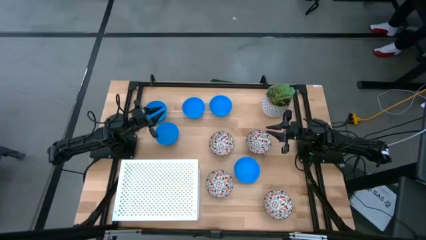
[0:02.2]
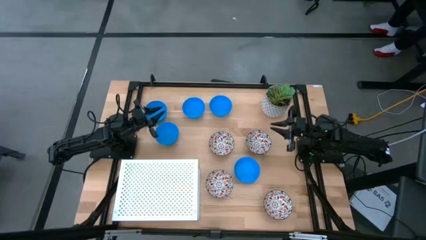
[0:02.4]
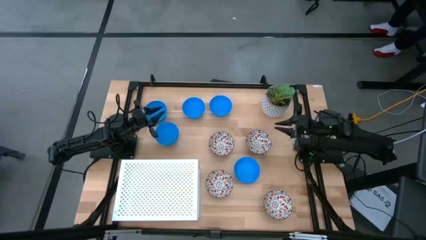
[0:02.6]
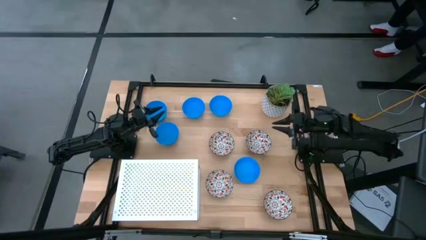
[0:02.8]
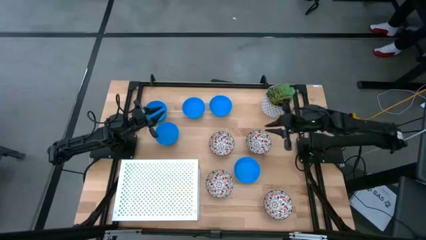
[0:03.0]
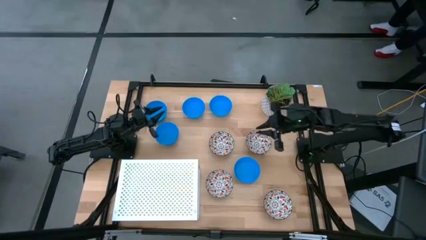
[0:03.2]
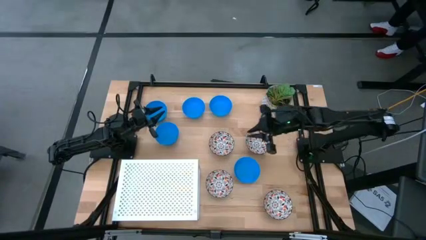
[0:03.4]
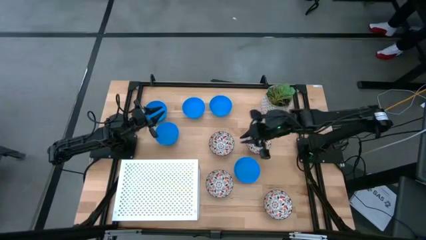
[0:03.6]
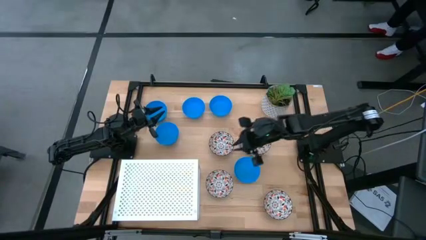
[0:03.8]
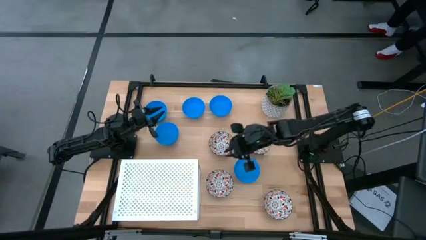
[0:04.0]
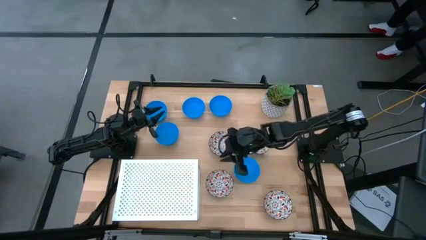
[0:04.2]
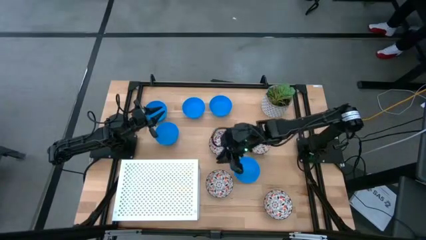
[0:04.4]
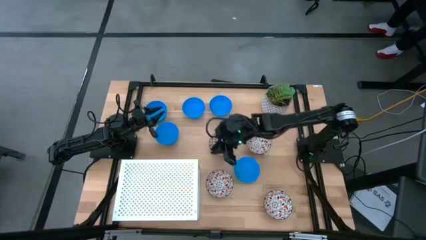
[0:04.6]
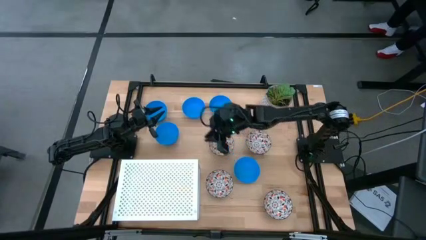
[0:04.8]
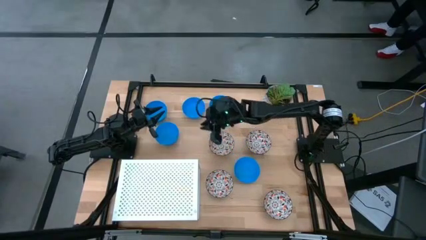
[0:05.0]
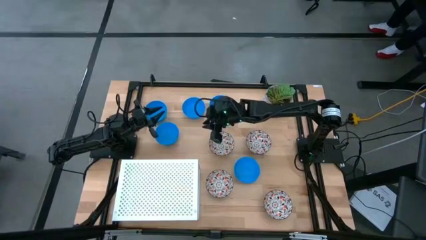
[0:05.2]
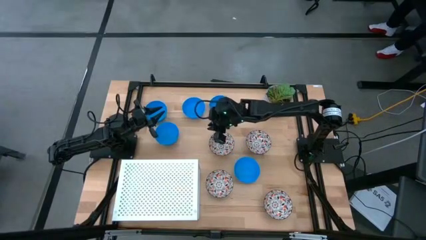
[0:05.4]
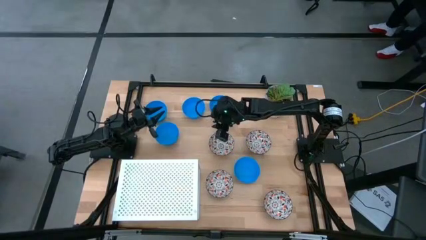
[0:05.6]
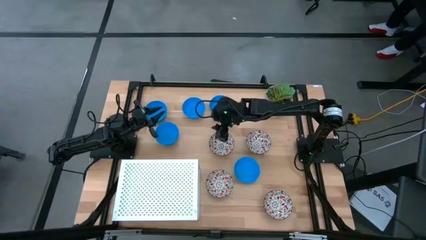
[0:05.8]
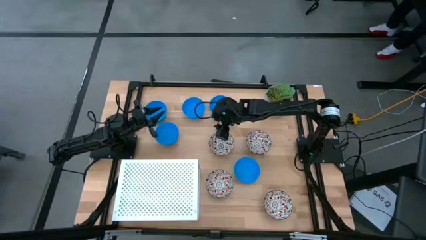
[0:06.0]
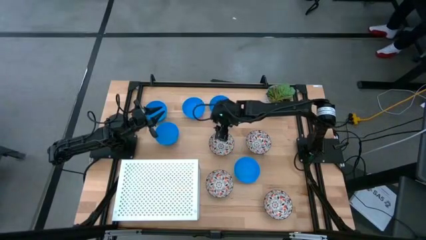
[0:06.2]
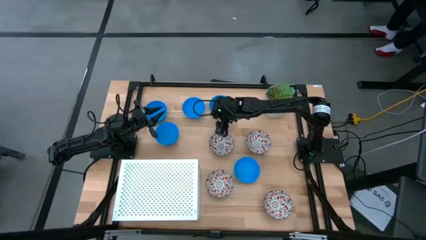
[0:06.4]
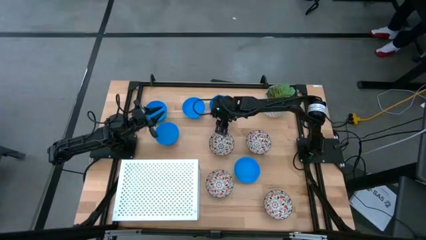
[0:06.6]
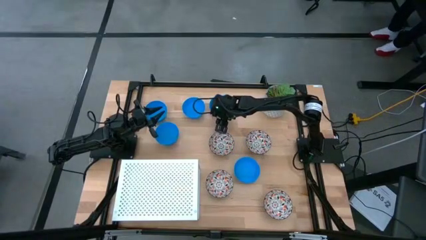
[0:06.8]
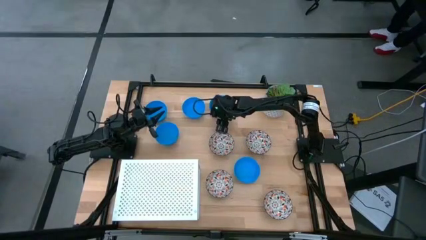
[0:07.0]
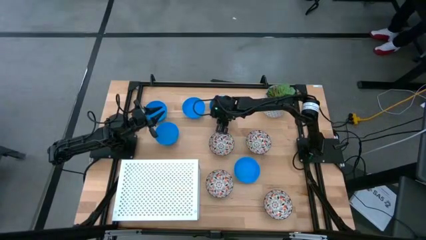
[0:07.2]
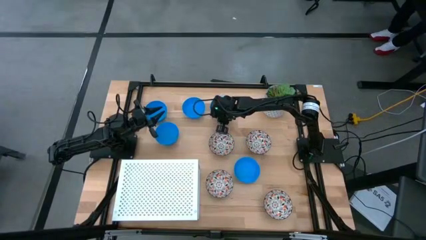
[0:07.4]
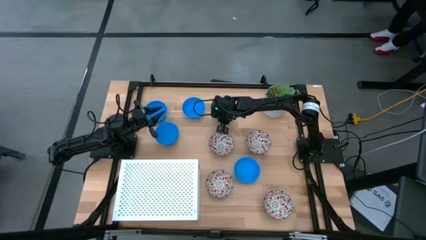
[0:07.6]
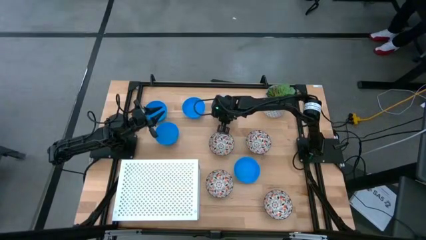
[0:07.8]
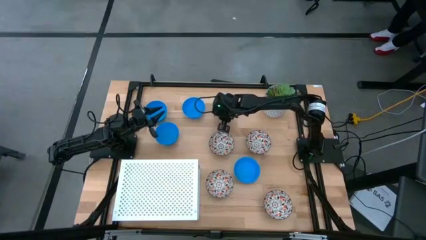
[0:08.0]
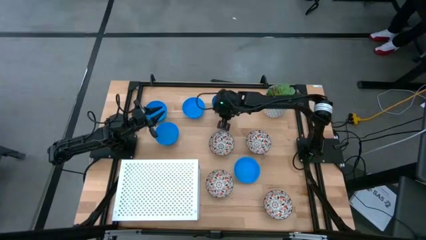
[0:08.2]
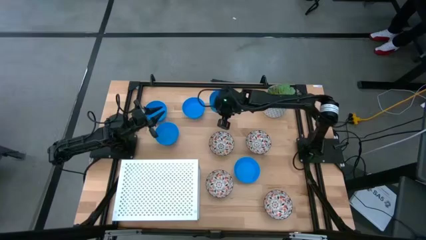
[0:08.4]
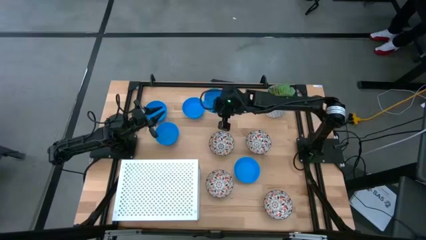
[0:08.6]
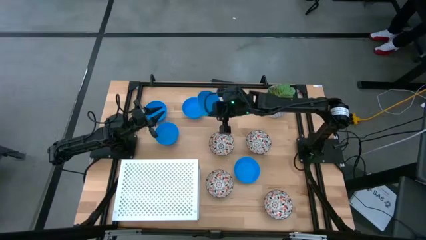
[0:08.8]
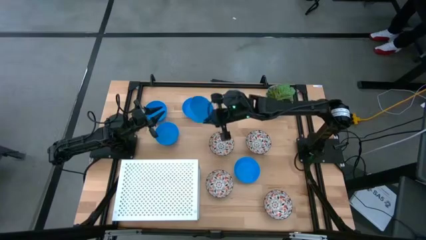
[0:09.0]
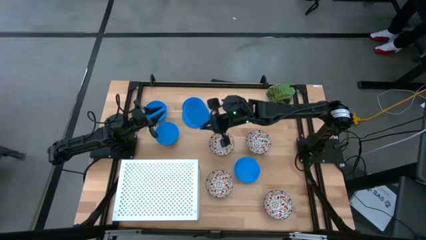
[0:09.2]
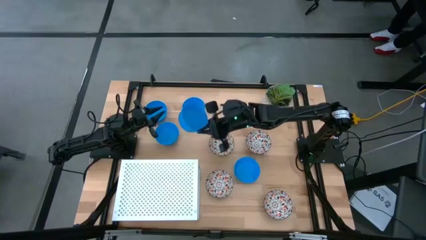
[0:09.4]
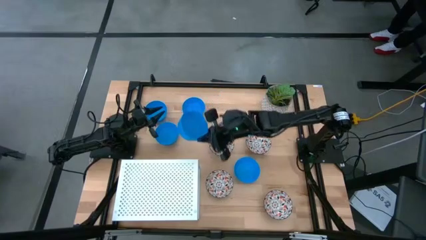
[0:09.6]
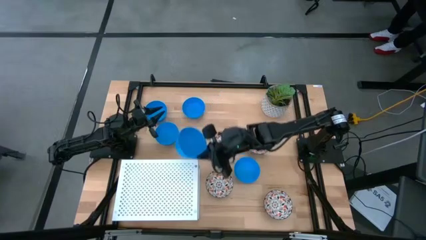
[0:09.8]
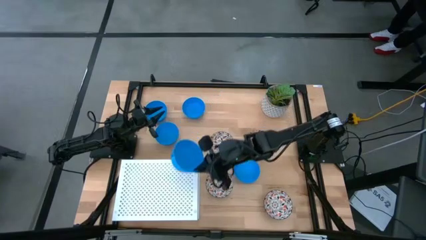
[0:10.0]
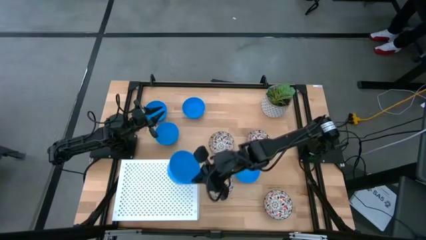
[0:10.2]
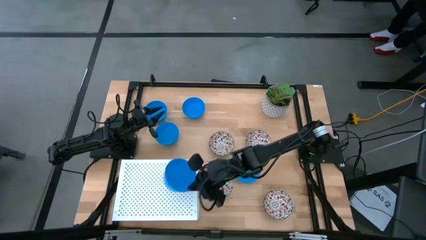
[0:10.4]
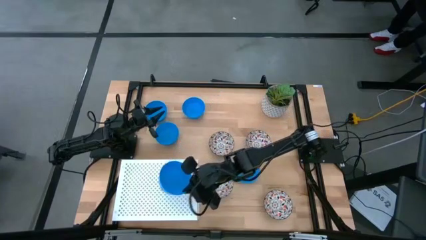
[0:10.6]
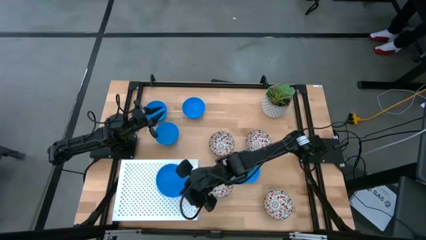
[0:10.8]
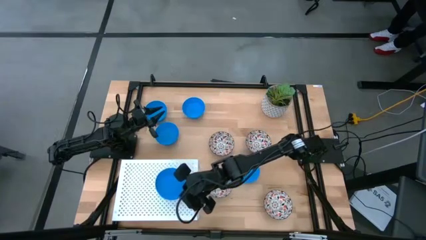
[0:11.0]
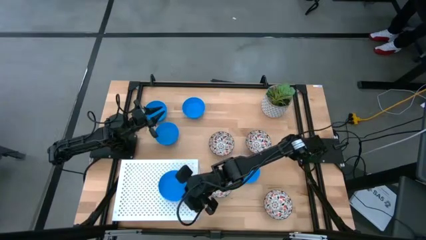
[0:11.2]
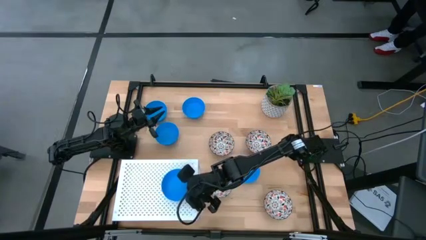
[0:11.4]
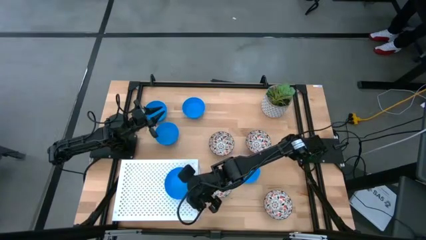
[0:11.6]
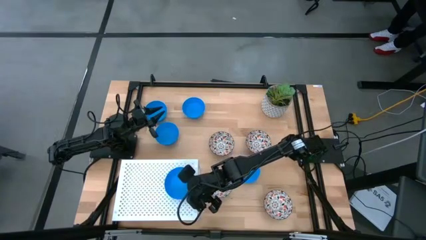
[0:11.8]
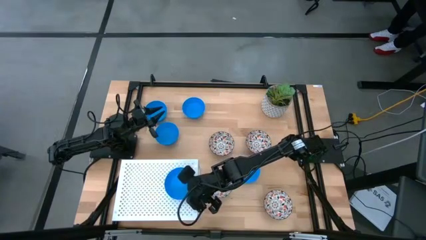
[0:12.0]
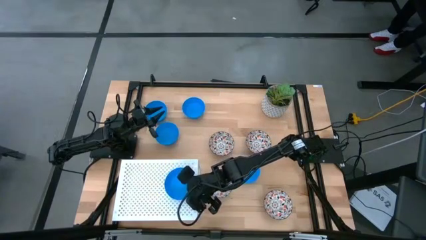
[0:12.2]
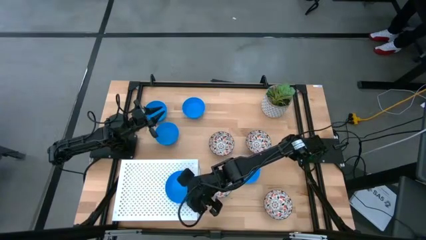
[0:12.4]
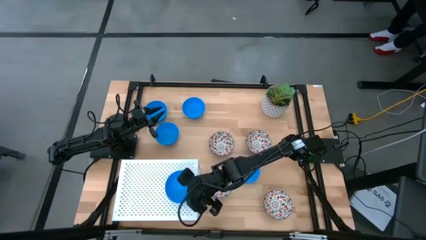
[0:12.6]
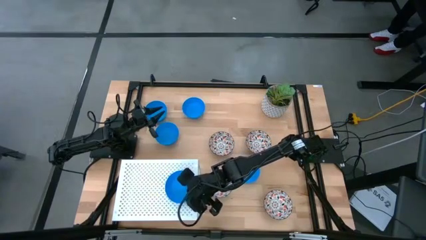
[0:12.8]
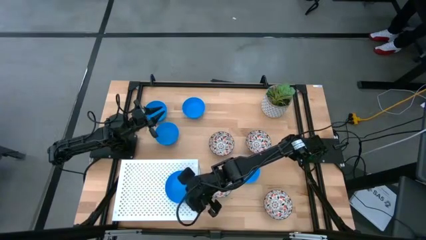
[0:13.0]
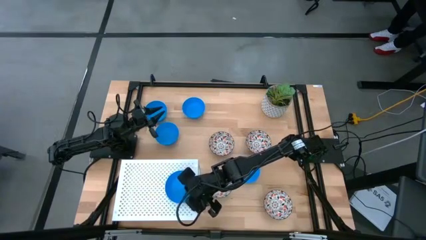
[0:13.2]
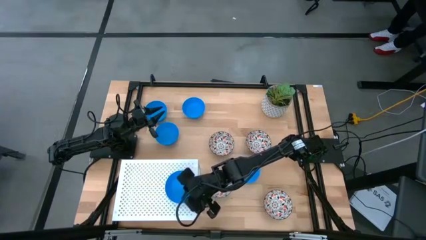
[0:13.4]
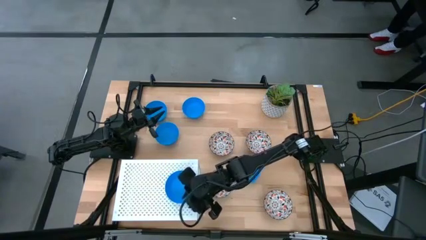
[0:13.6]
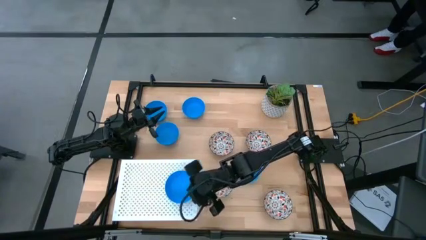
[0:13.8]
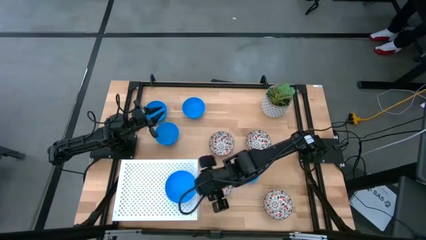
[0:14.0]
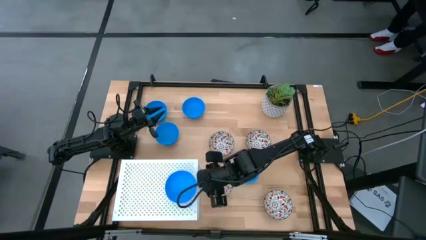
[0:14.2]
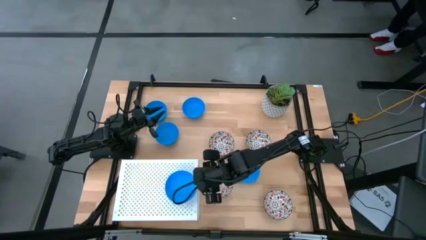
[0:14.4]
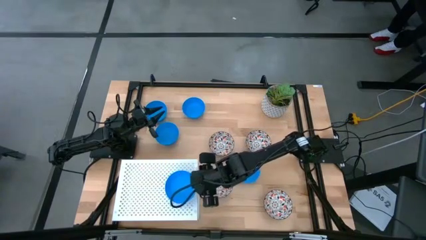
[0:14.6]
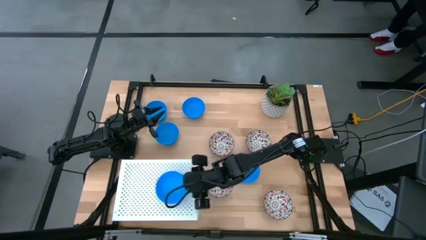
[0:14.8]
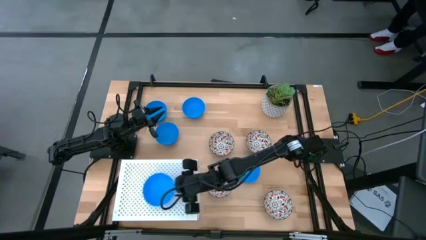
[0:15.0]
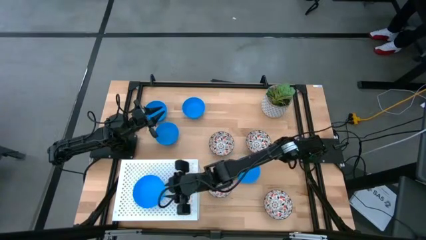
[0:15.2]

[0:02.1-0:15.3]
Task: Pick & Place Mini bowls
Put the blue bowl on the shelf
